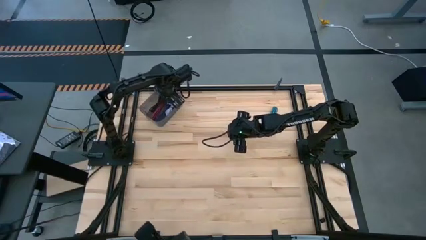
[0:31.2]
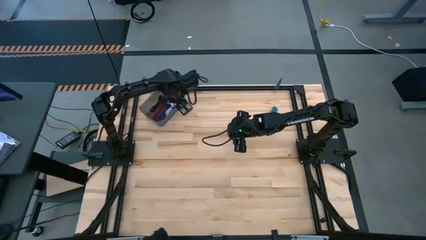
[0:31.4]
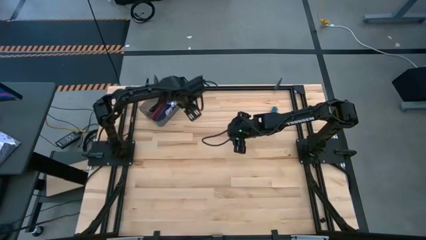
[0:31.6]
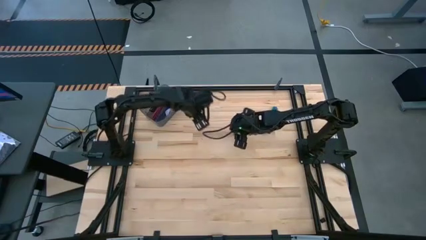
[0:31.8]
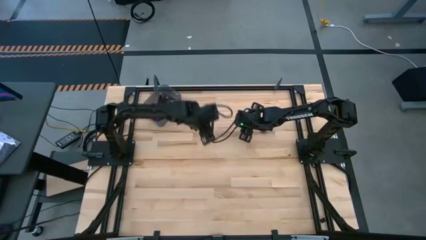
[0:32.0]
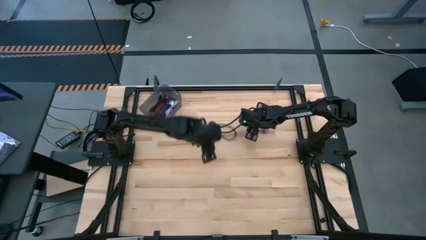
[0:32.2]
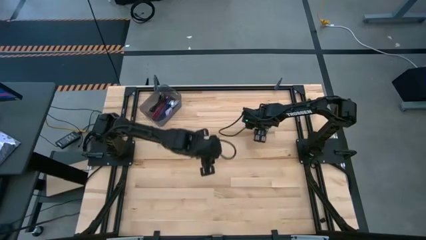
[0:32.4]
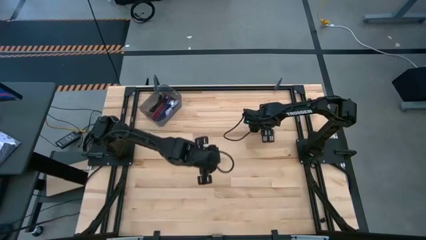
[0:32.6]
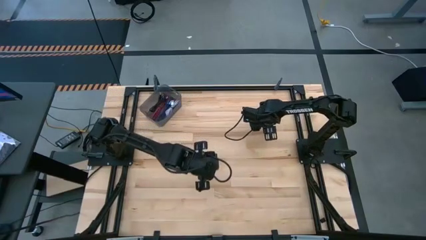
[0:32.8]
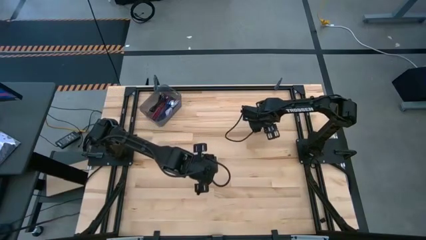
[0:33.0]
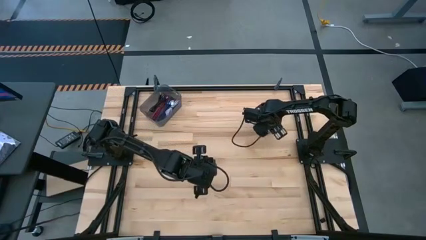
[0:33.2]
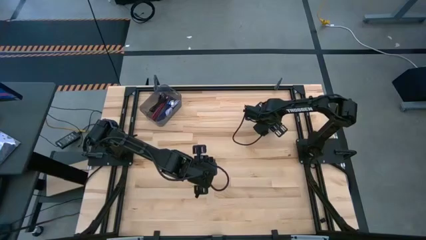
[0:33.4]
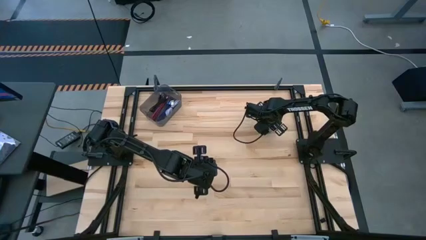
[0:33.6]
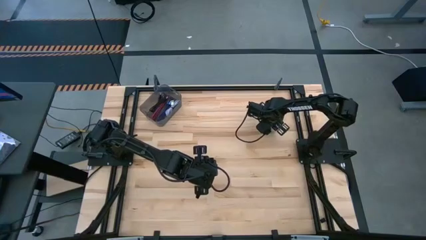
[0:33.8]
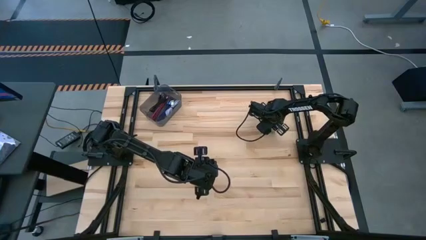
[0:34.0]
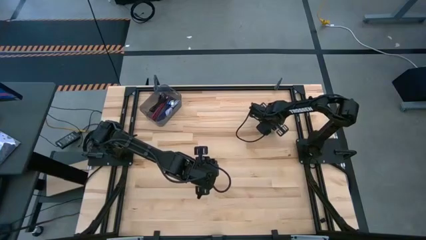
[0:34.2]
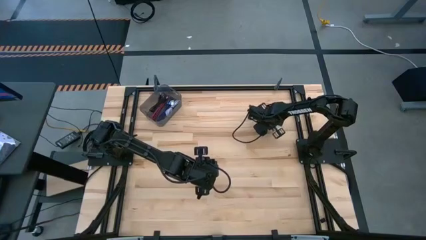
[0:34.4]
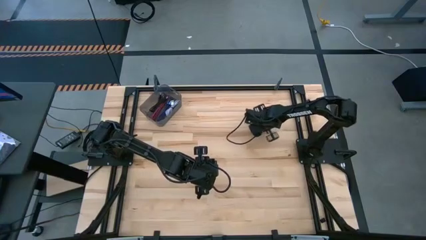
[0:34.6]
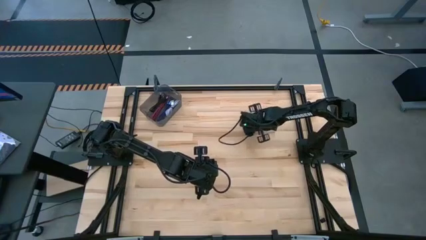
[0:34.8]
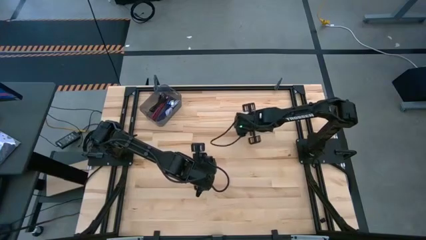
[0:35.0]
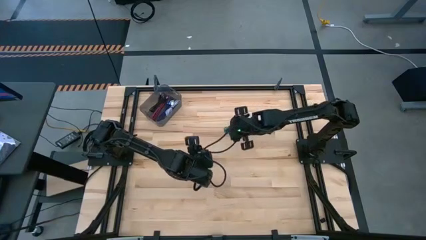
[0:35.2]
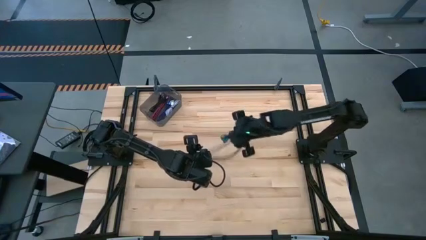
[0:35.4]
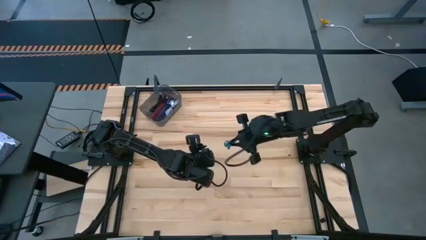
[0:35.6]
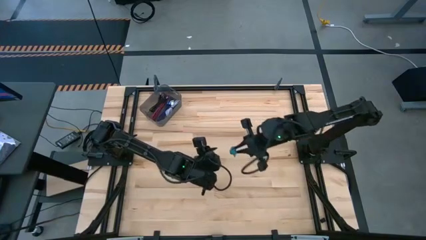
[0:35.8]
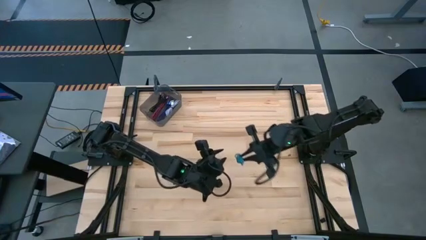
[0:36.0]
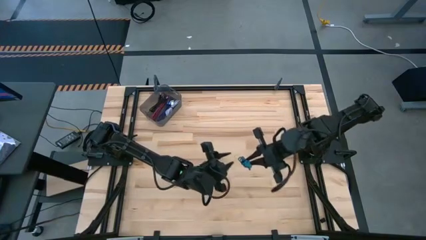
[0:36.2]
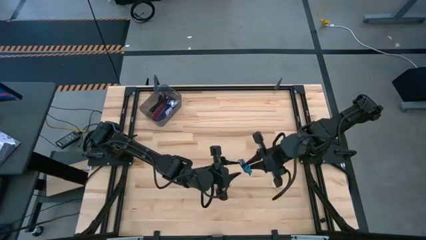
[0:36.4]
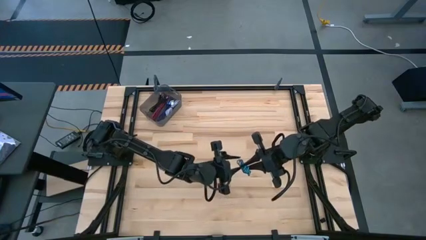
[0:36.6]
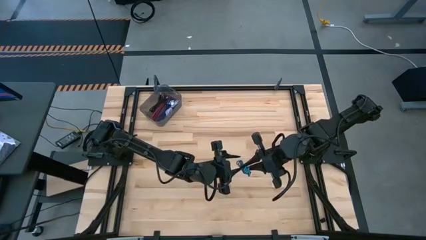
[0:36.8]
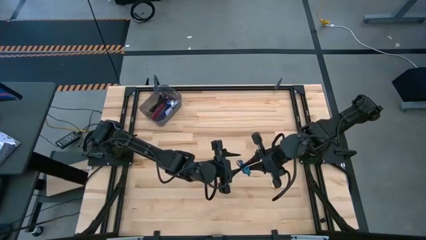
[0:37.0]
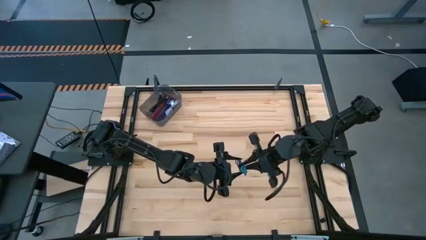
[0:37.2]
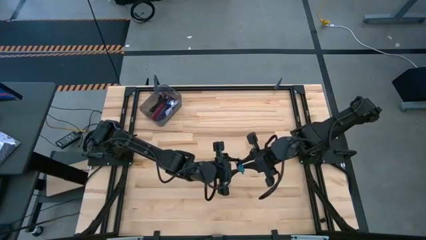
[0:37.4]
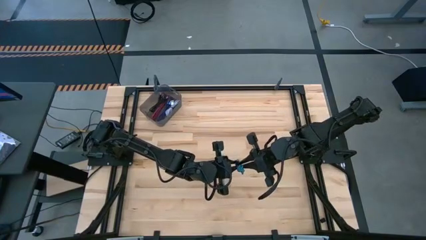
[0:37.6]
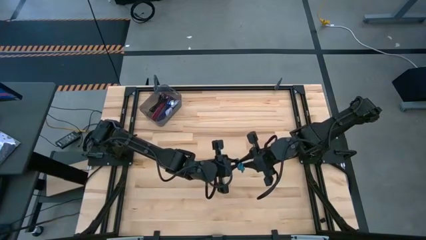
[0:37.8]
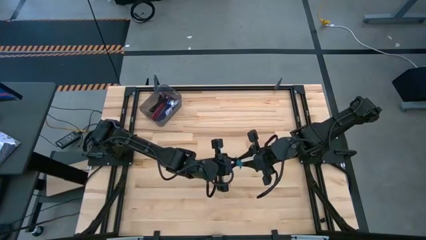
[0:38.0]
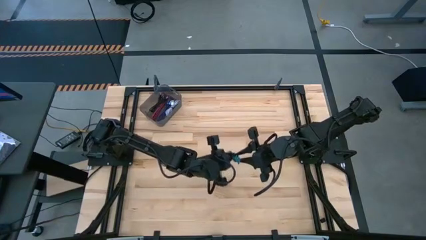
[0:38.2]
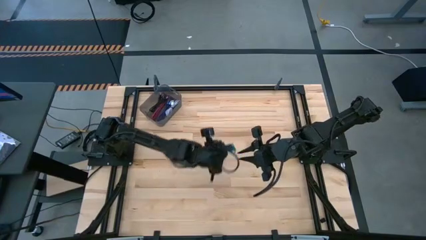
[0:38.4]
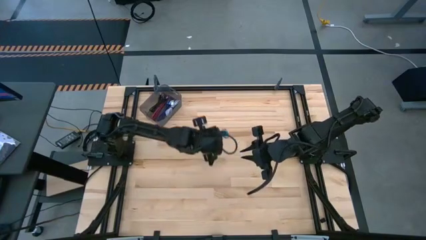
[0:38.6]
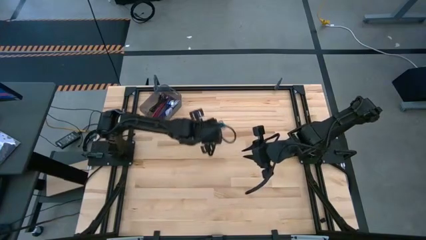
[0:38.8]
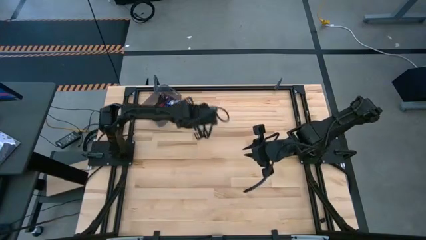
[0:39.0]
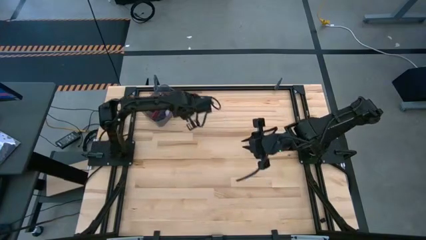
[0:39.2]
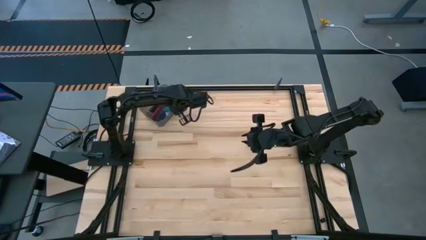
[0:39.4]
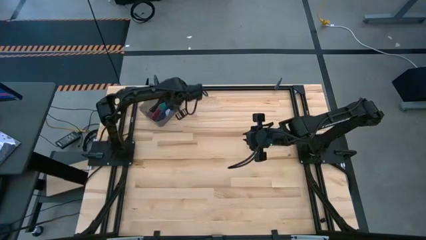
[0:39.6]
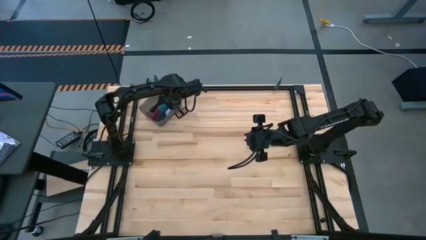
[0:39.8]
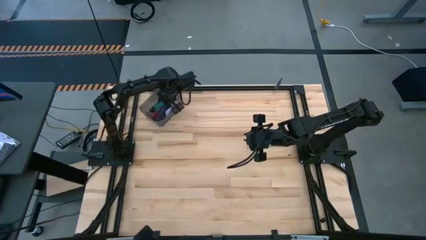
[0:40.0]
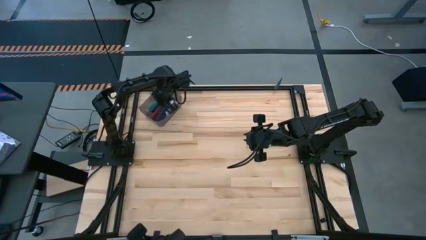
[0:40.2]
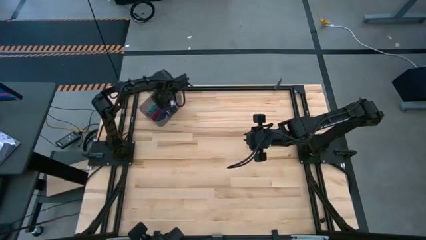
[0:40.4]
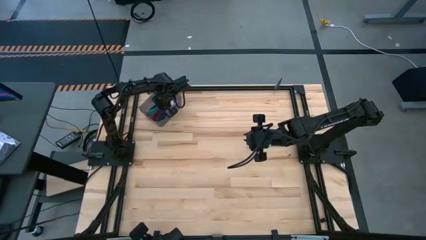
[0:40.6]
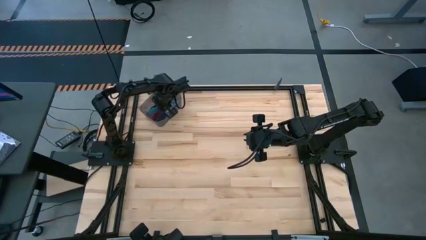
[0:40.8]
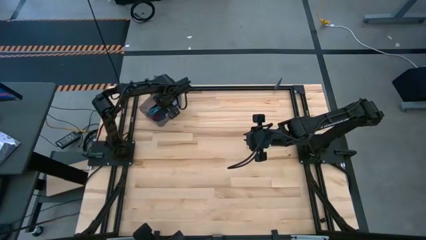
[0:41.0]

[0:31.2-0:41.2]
Task: Pick and place USB-C Cables
Put the light blue USB cable into the black bin

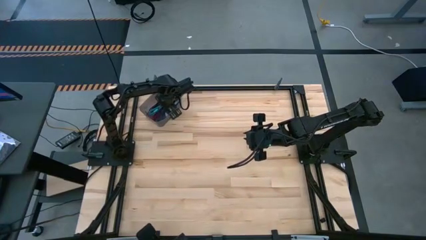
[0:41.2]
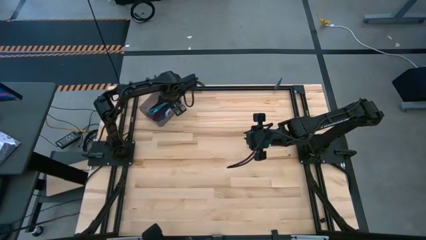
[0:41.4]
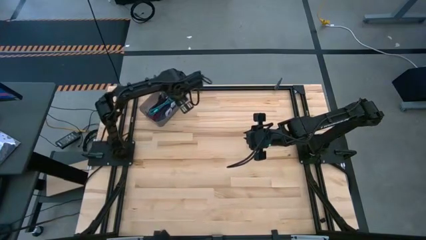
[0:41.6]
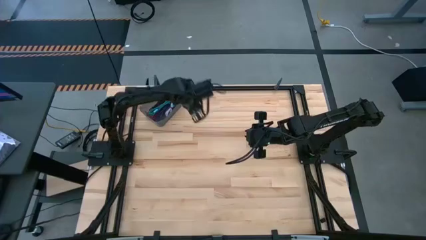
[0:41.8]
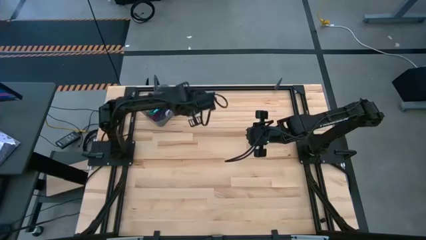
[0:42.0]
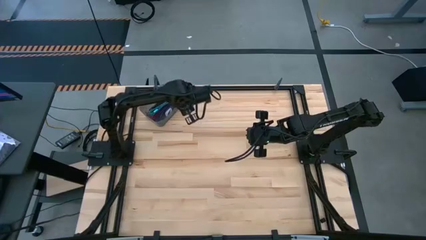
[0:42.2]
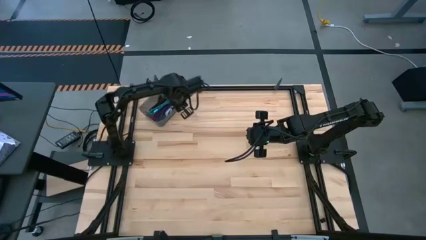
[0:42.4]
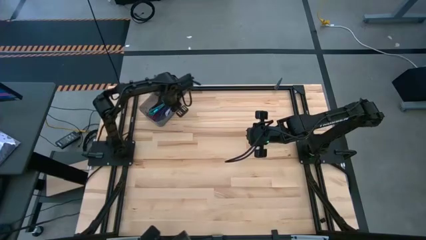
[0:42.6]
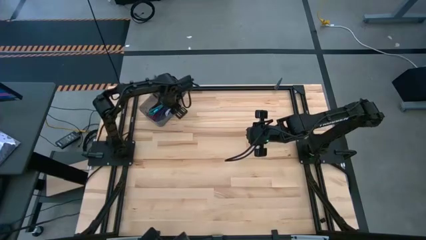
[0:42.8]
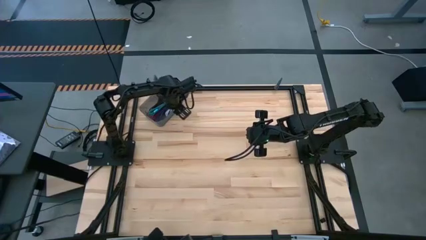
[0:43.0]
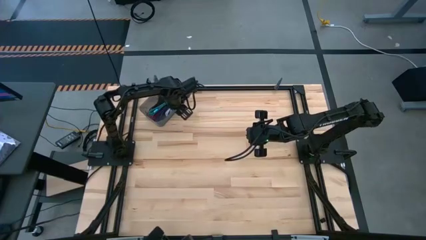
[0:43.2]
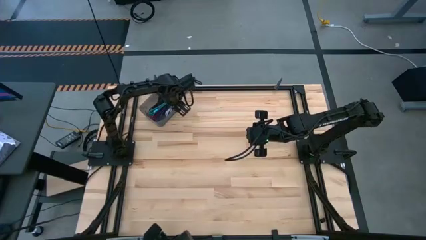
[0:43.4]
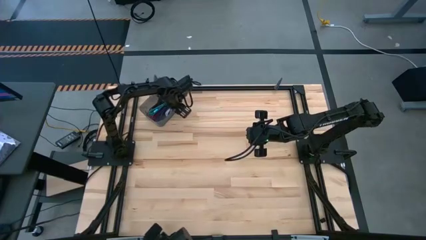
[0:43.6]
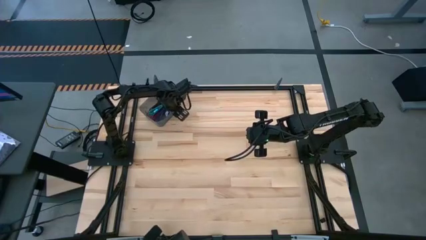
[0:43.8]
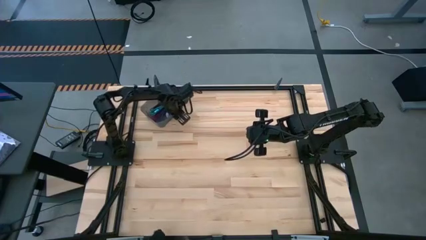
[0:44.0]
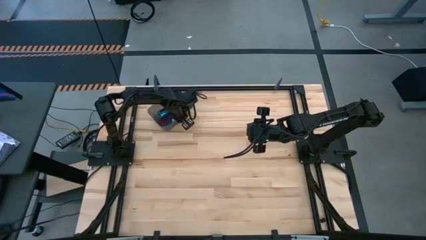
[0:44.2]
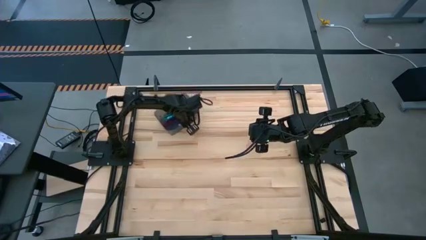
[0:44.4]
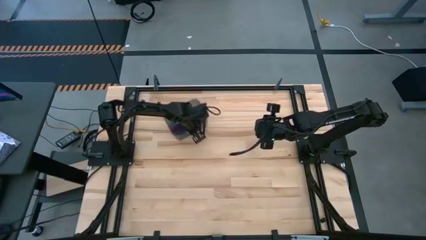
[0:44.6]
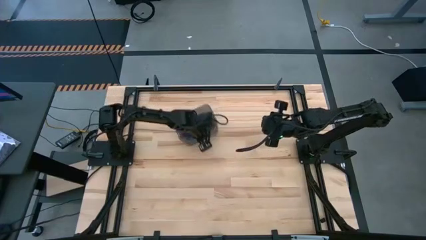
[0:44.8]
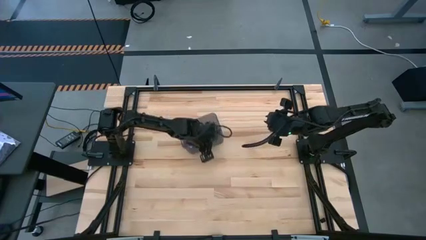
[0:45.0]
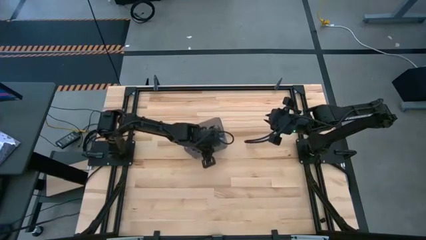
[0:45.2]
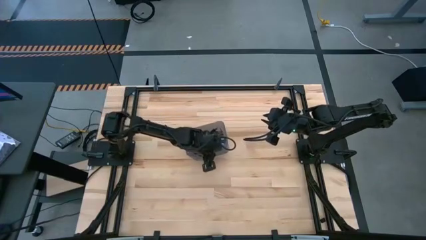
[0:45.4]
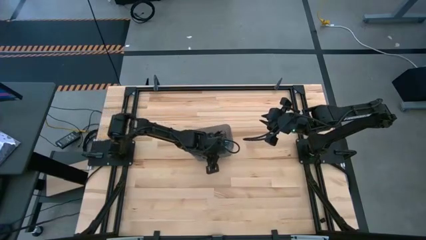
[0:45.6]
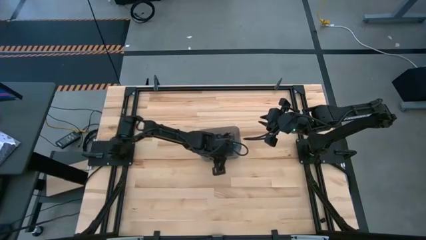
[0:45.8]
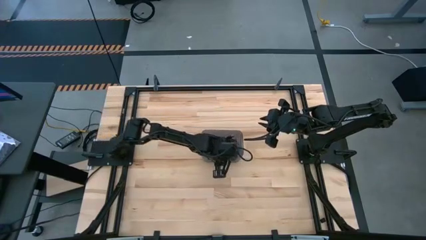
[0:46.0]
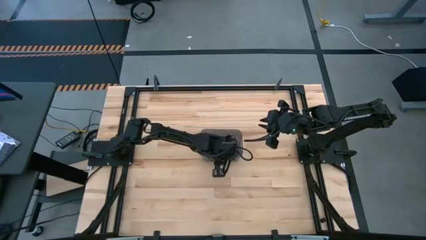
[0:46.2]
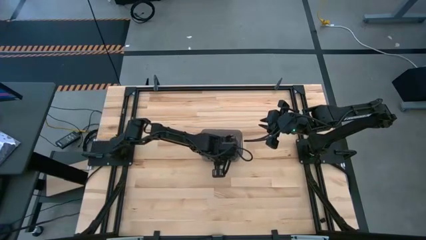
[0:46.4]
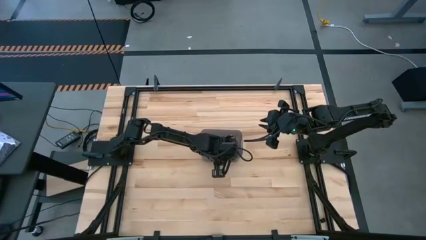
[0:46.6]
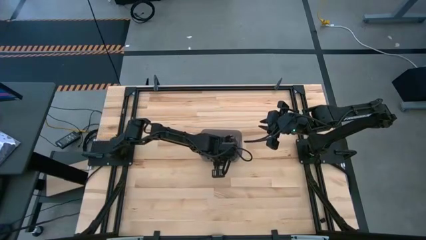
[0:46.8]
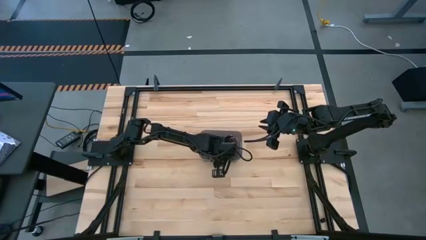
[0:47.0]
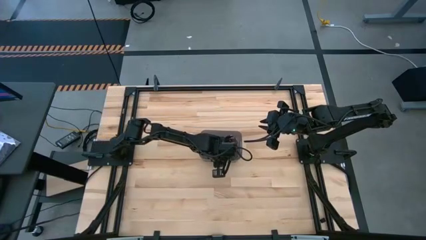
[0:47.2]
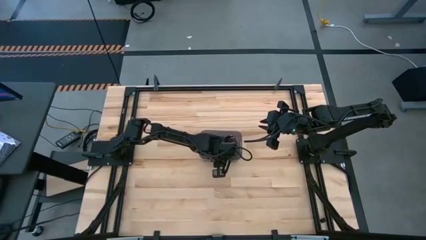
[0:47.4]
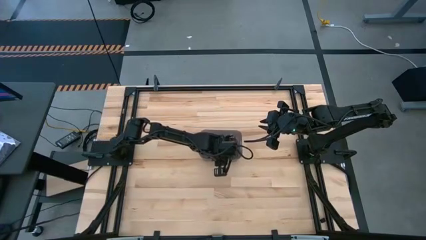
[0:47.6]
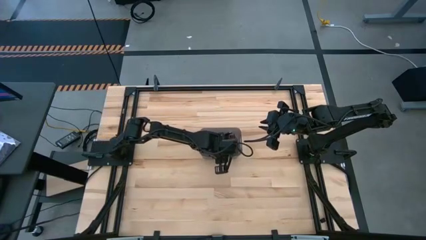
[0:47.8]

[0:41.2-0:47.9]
Move the black bin to the center of the table
